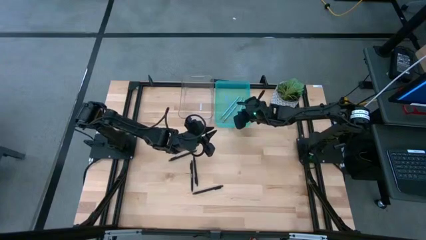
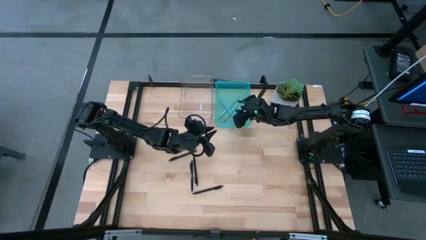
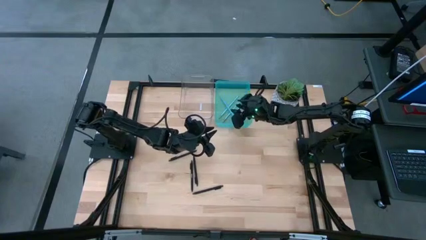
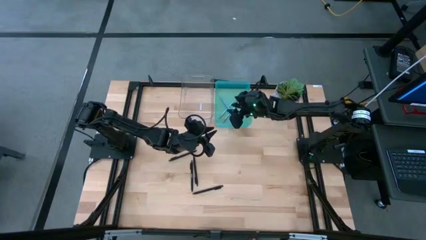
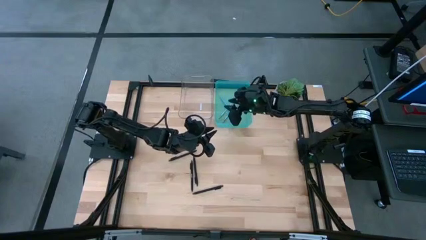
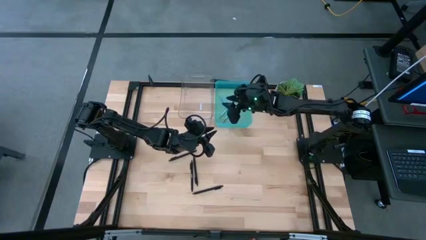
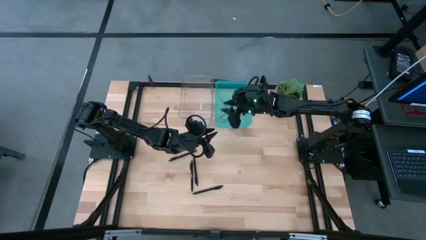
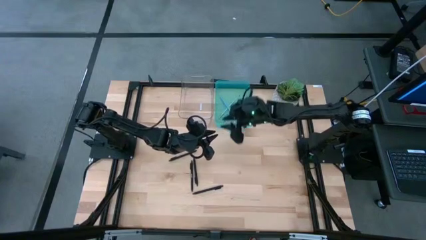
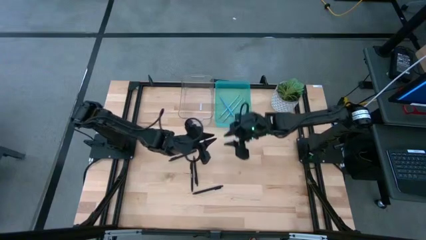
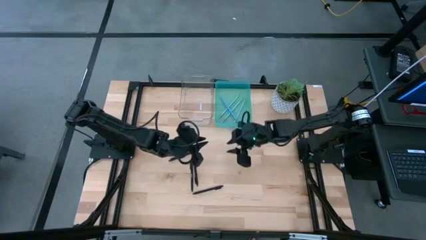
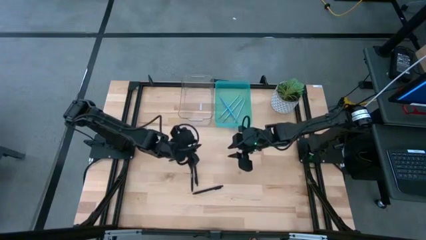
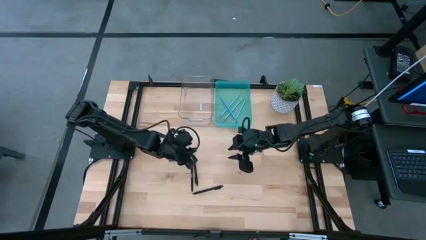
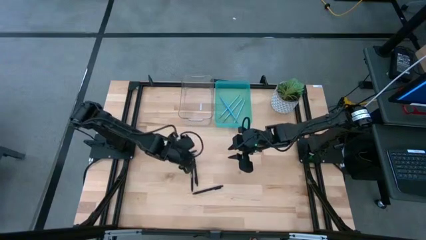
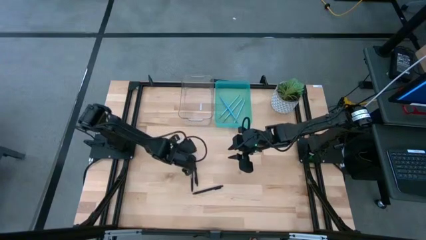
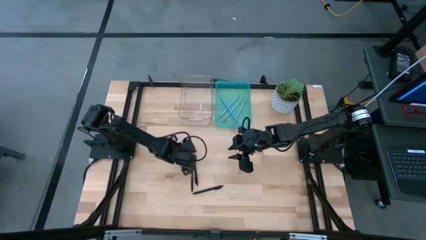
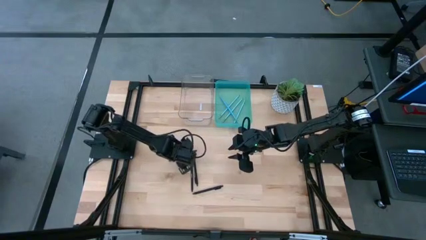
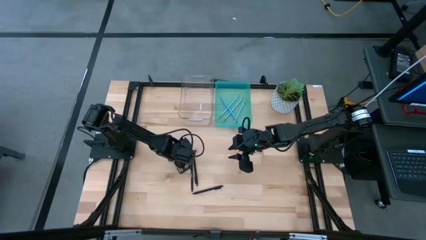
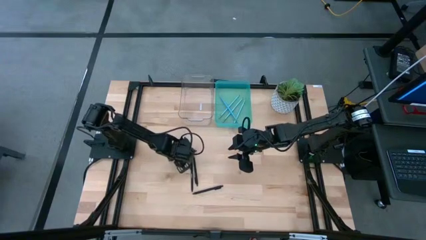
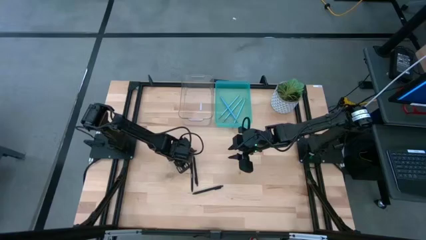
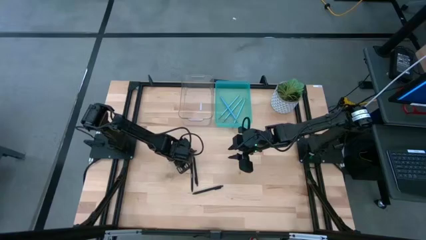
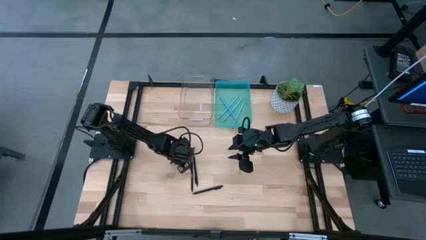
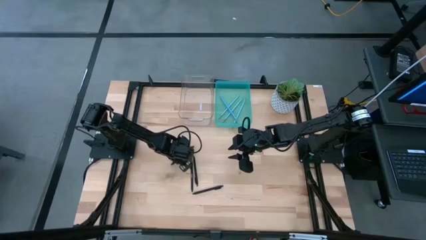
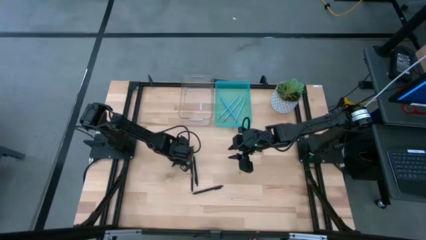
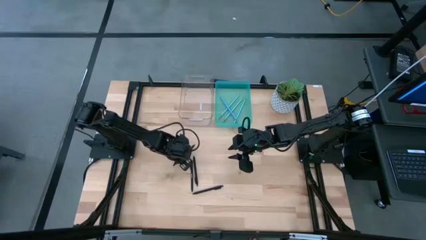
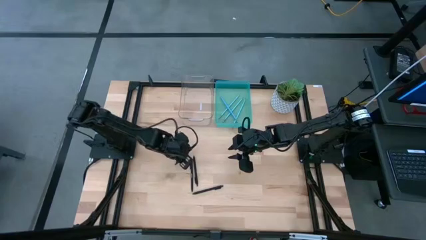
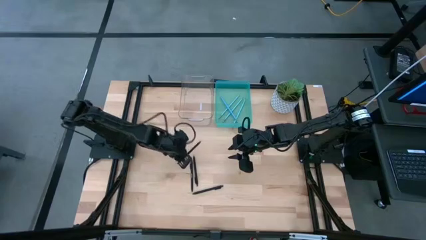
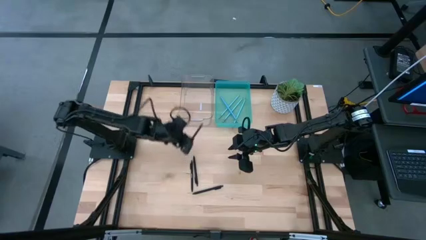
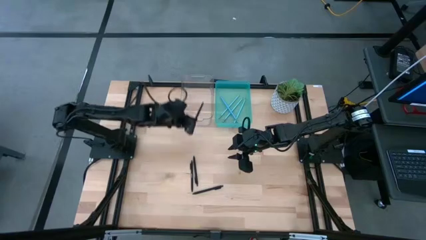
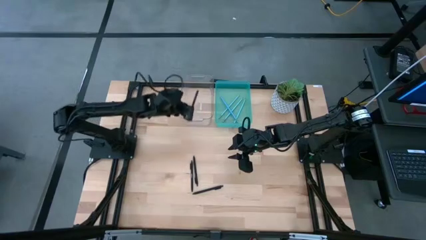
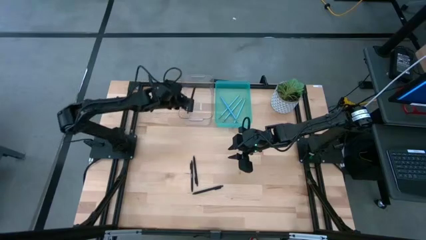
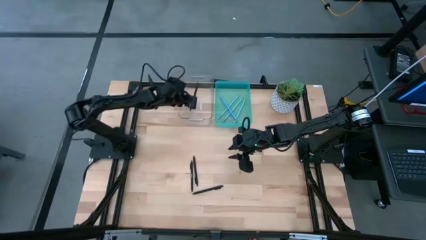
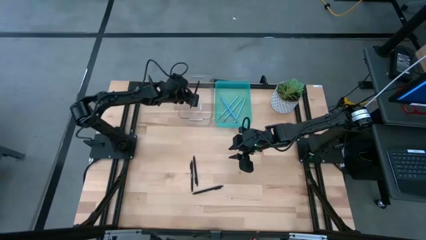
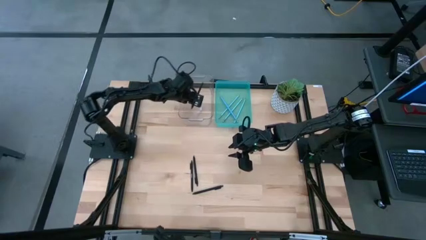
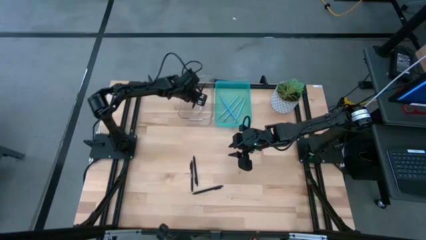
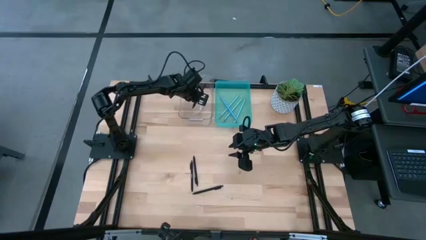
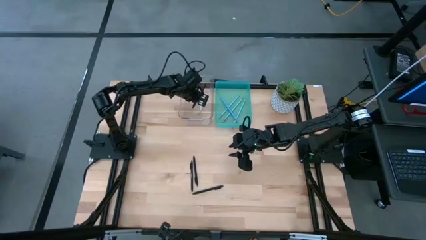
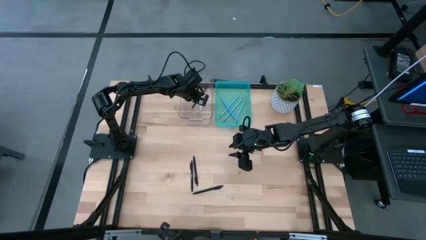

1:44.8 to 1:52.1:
Task: Sort pens & pencils
Put the black pen into the transparent bin

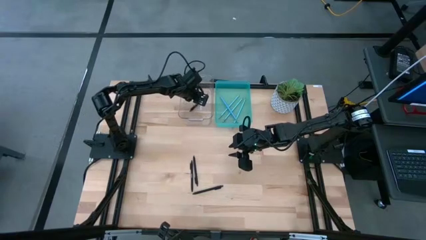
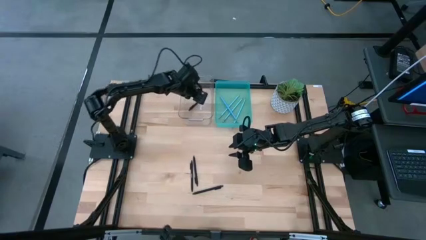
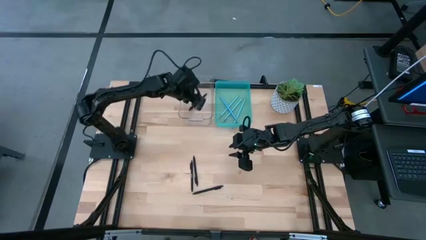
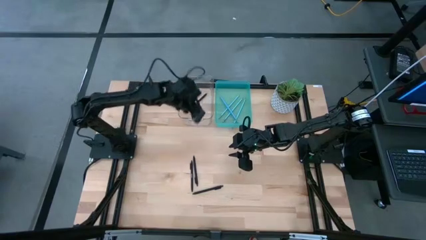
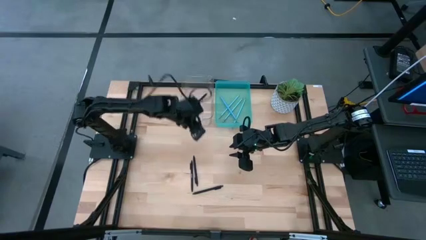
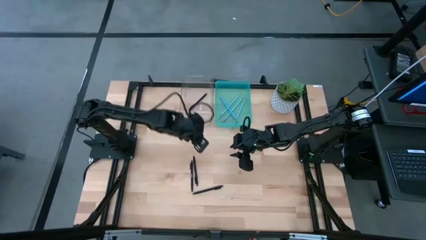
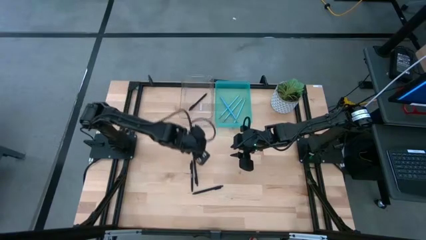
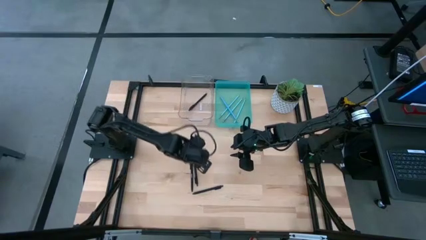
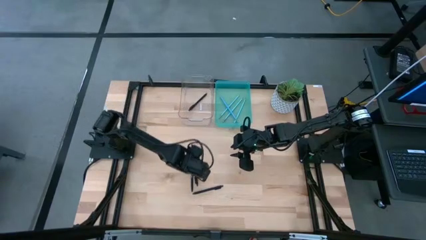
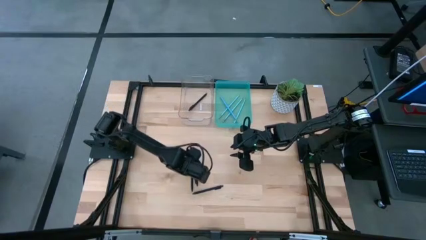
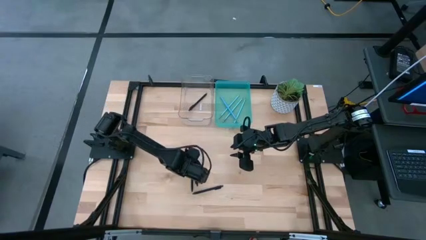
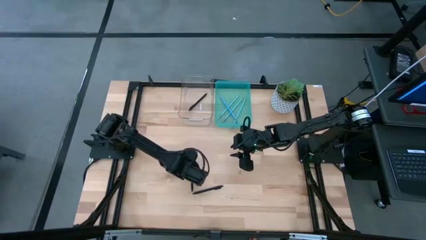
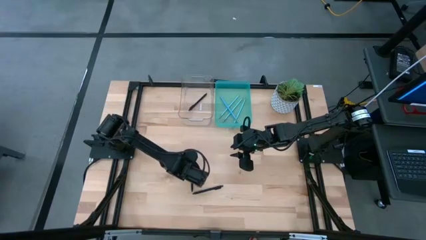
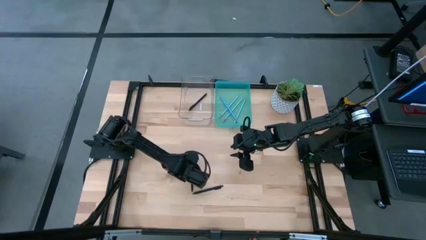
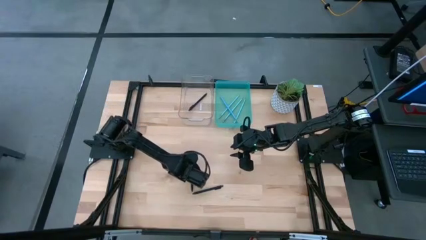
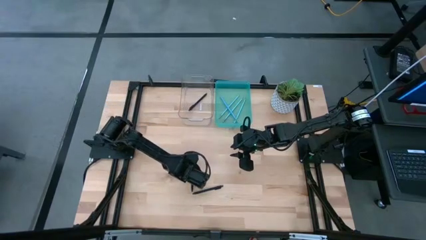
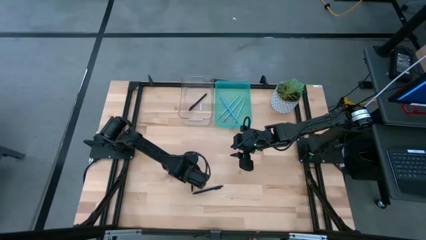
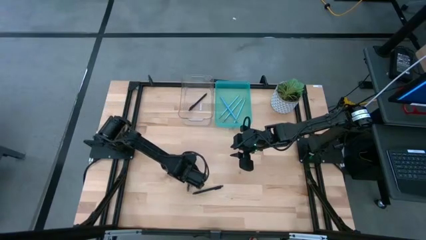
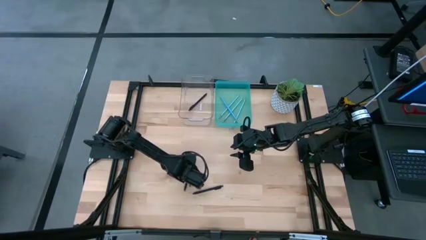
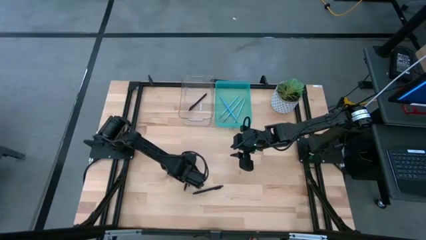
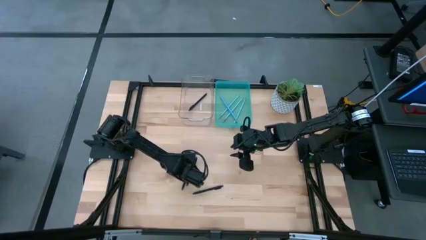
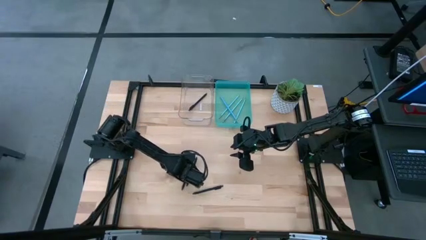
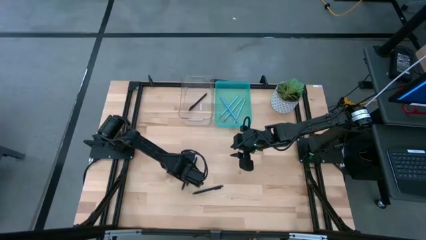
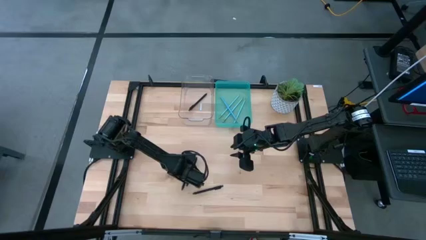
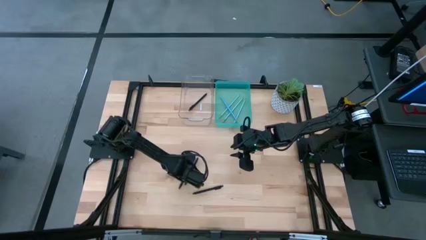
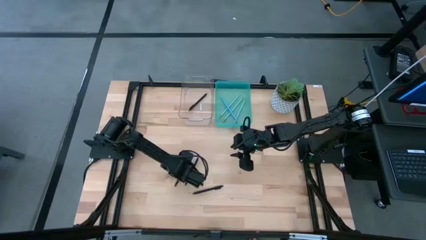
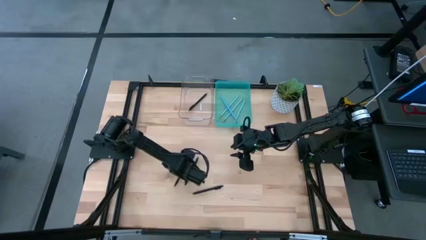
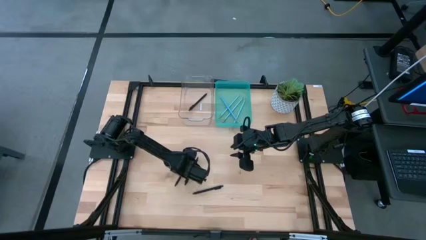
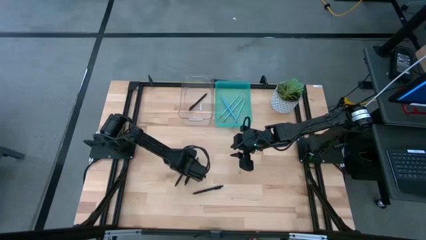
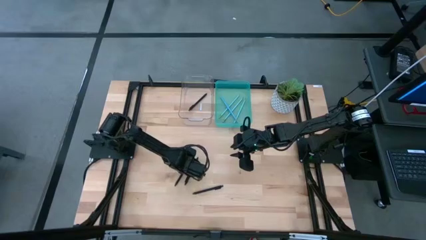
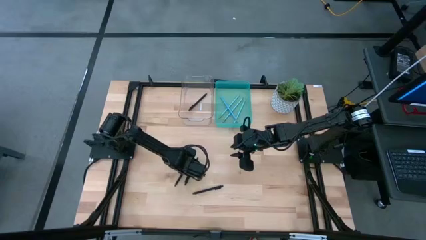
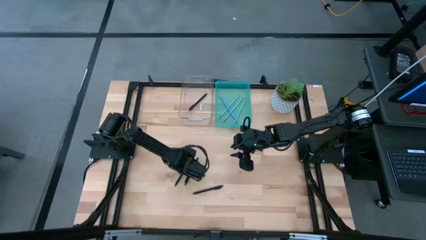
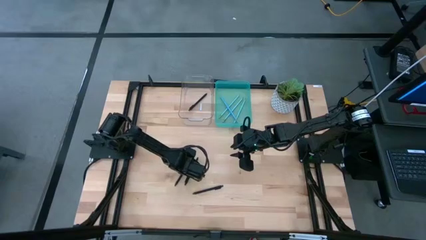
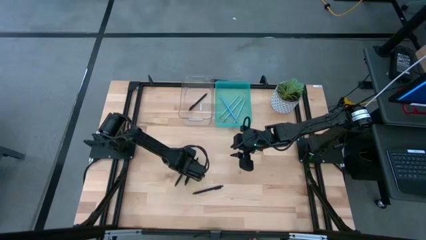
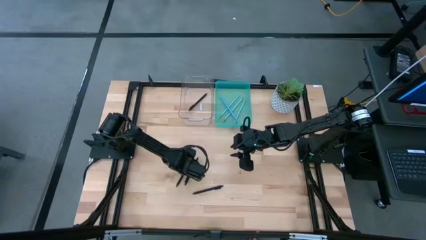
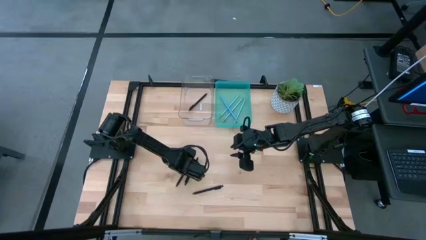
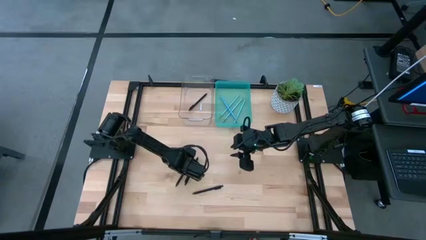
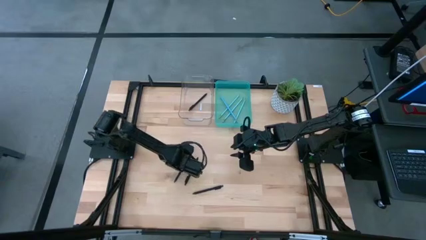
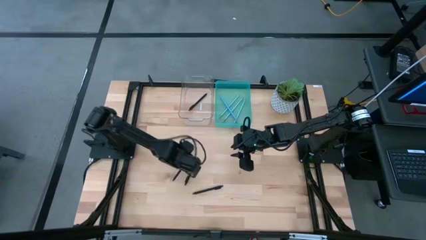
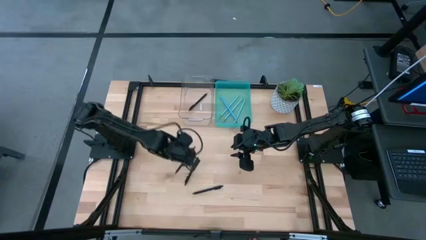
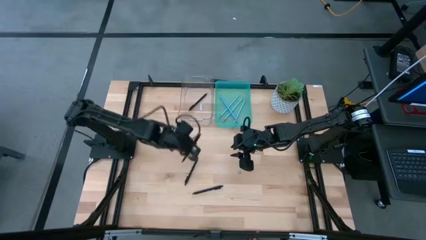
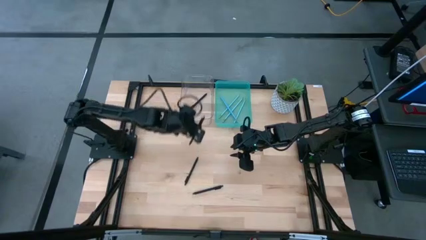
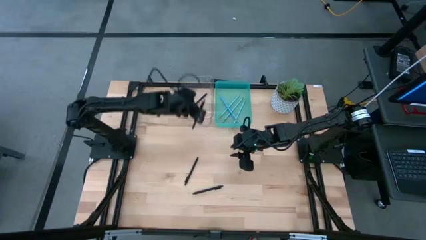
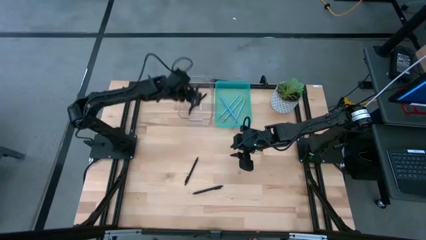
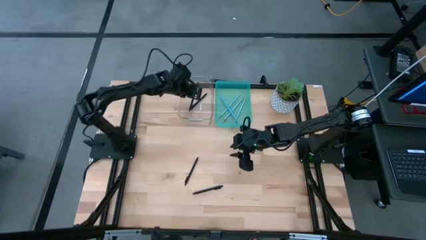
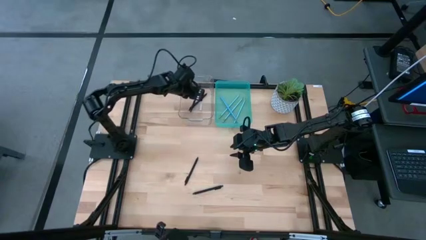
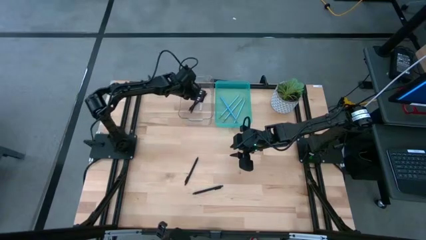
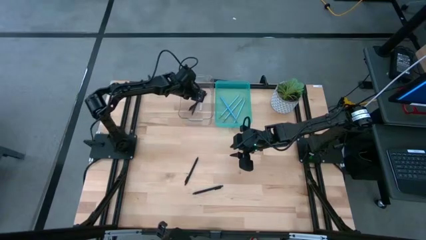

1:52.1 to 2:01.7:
Put the black pen into the transparent bin
